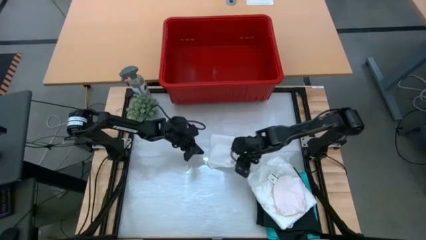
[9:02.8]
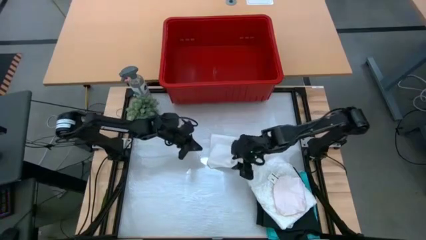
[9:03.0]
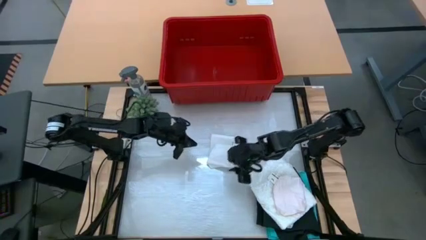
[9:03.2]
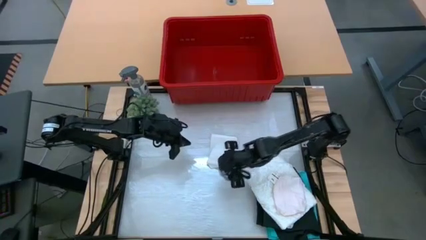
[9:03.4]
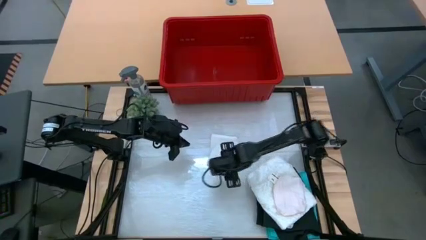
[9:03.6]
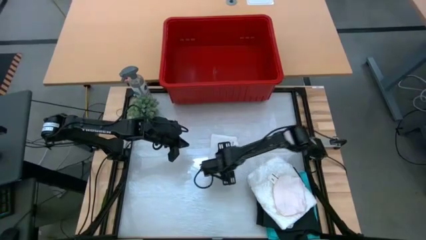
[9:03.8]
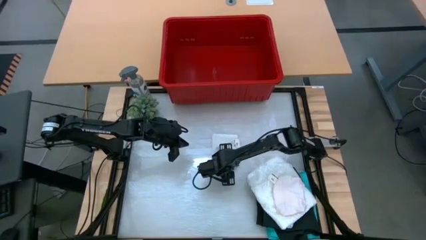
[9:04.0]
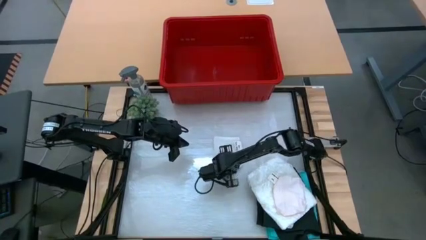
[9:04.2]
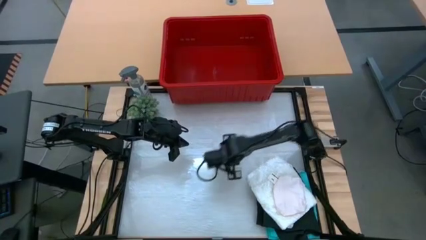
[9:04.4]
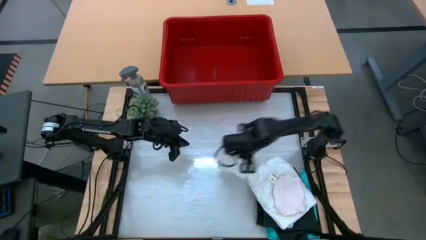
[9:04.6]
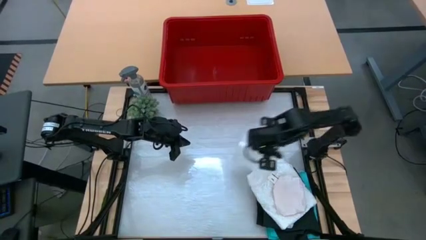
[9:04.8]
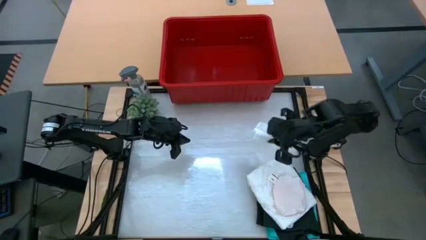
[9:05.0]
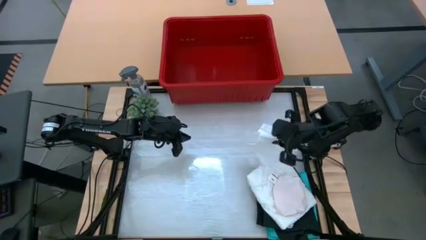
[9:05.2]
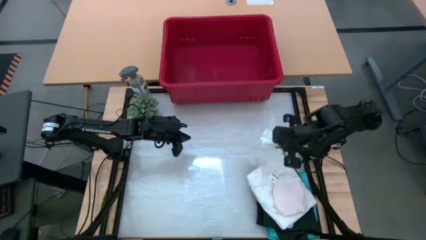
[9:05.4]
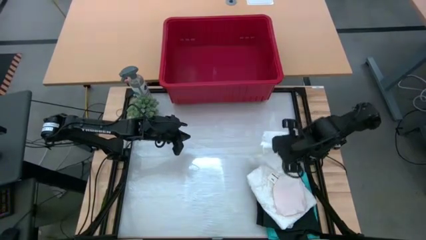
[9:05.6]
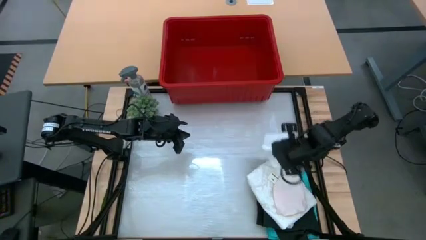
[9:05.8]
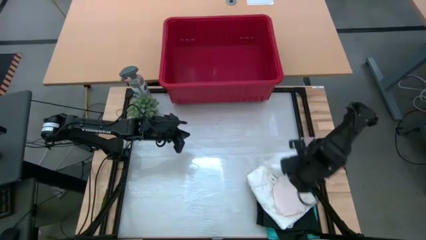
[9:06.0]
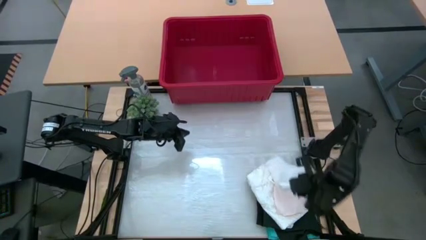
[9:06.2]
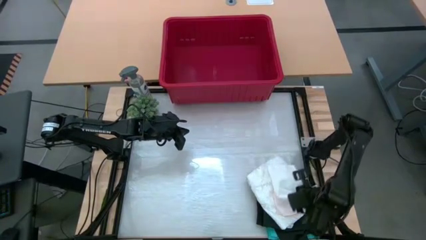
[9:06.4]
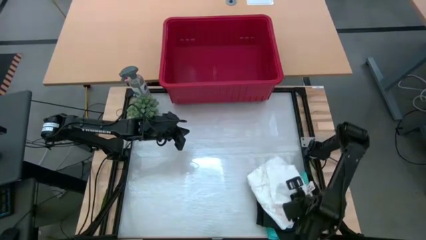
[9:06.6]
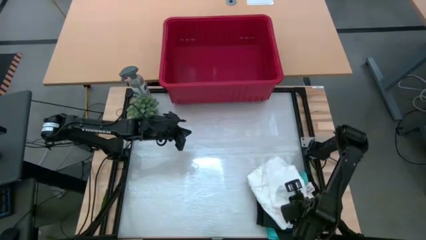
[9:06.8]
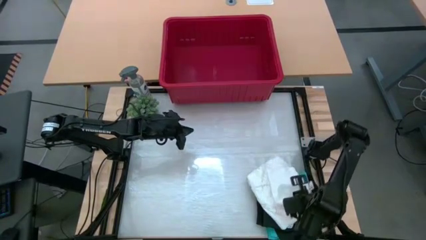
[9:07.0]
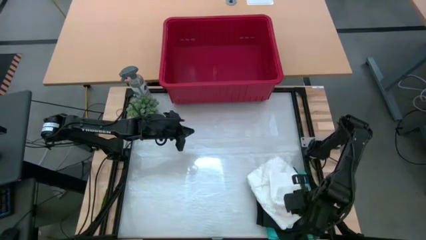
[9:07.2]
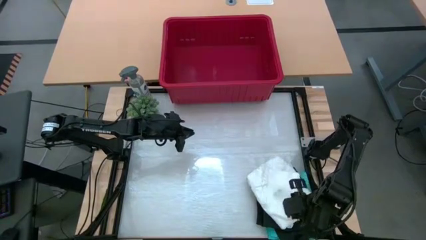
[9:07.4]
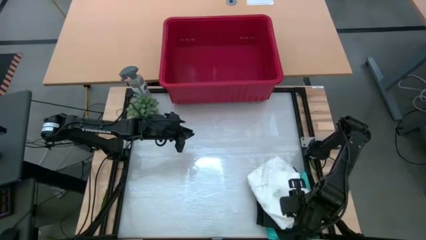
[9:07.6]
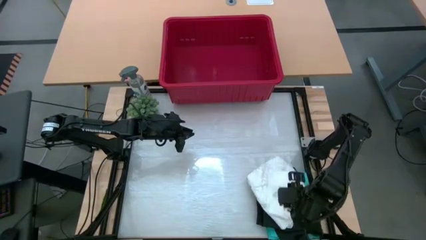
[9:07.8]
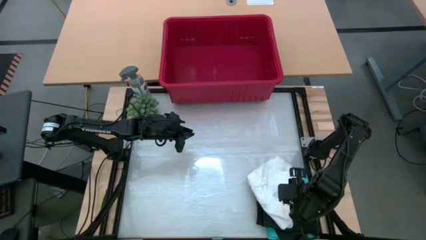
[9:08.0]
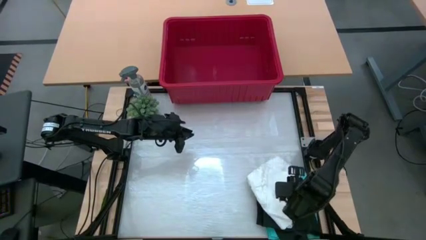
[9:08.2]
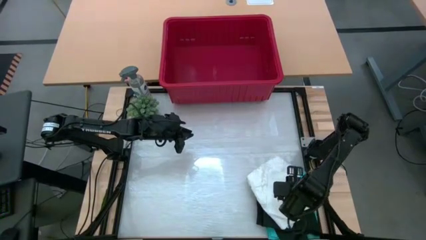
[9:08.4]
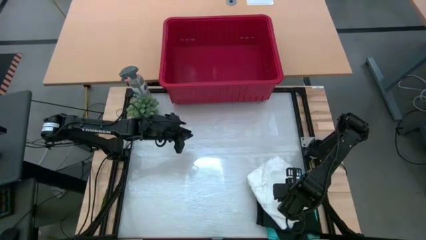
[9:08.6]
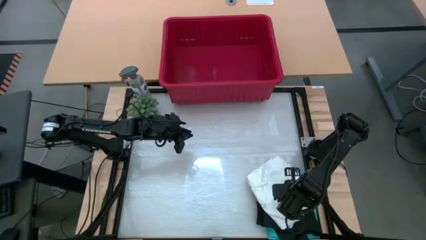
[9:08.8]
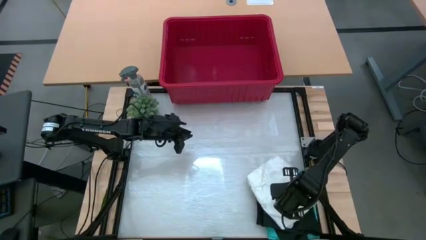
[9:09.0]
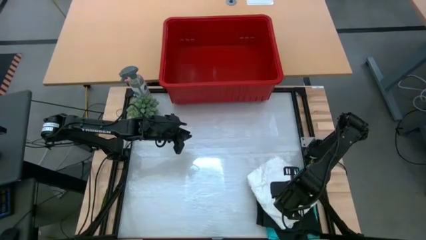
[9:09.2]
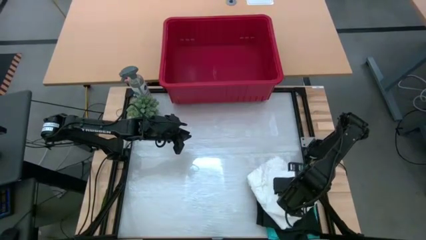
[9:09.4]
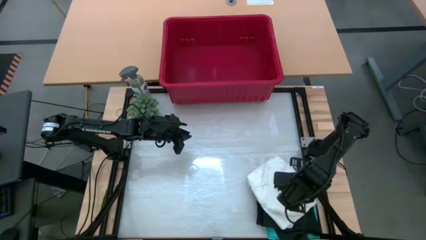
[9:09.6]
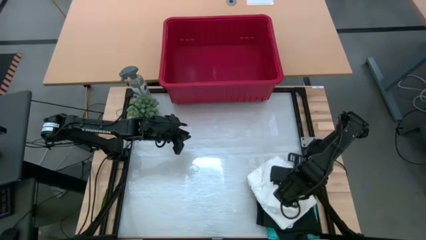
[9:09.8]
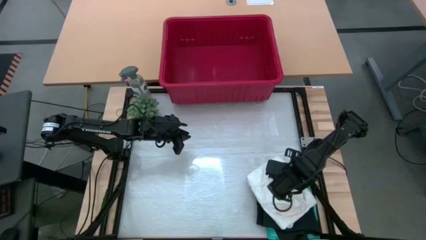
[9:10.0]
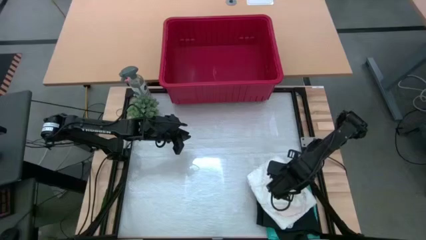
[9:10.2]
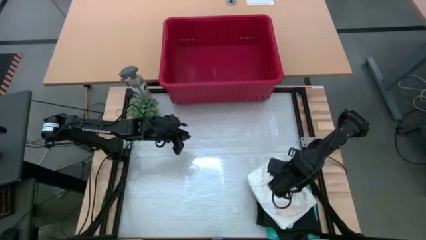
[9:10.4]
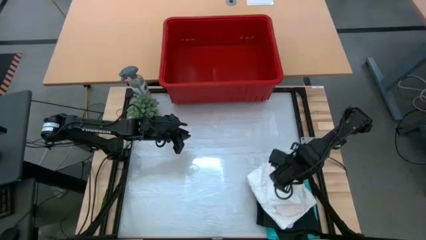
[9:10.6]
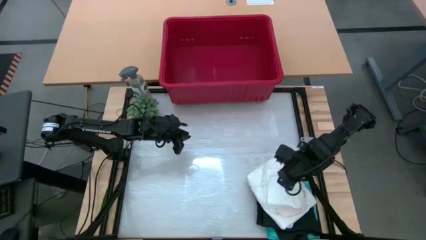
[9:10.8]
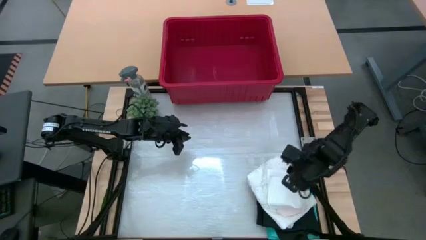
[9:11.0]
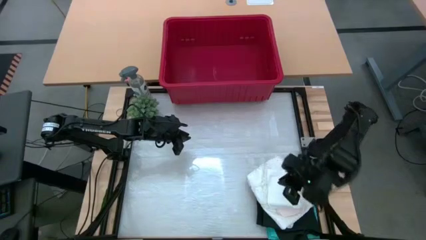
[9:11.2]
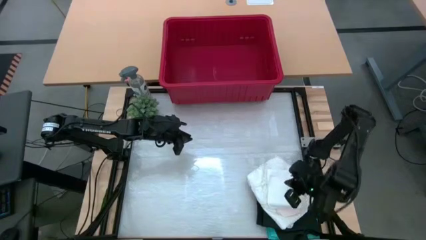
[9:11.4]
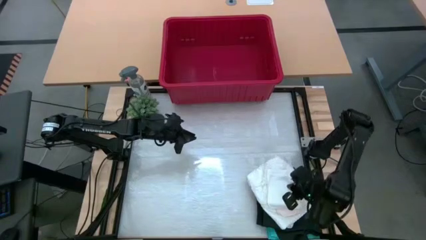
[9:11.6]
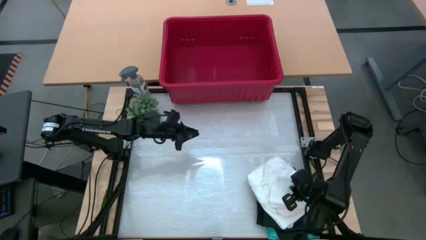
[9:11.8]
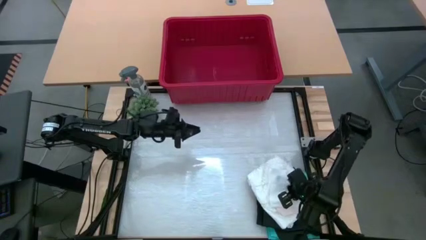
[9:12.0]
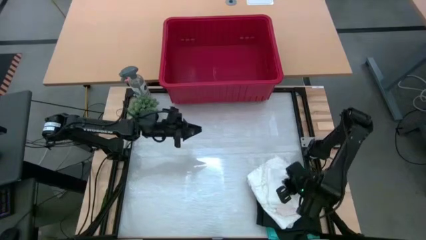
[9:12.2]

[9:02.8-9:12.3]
Task: Fold Laundry from Bin
Stack the white boxers on top of the white underwear

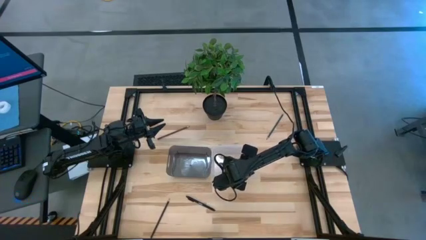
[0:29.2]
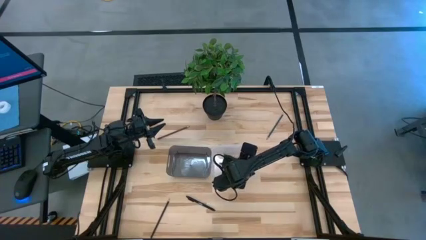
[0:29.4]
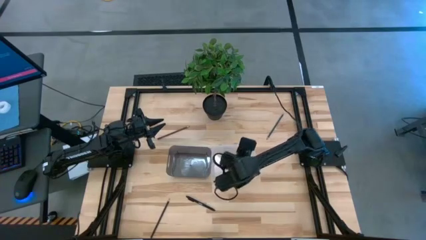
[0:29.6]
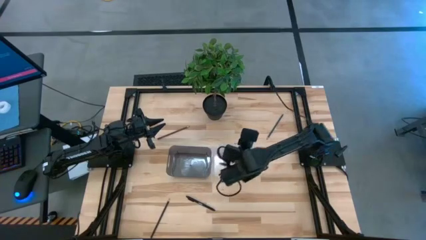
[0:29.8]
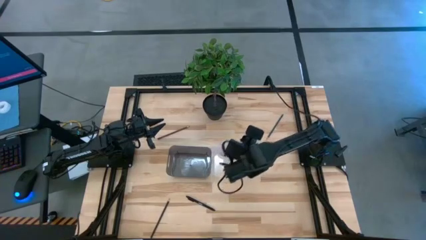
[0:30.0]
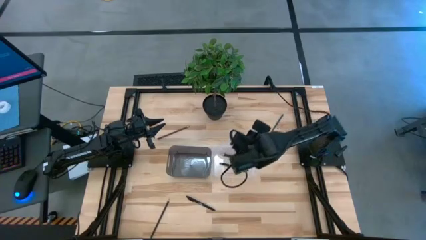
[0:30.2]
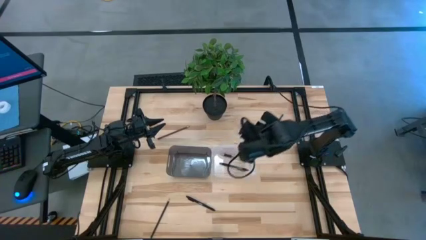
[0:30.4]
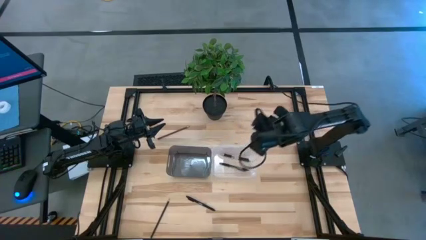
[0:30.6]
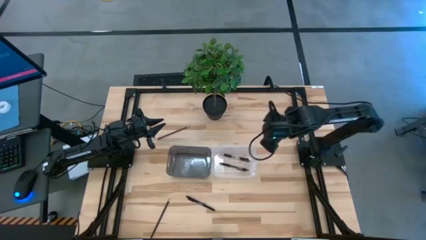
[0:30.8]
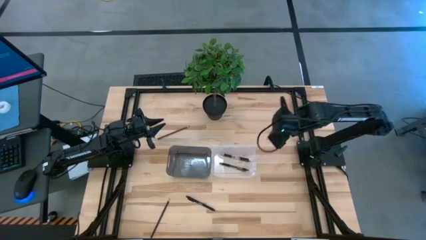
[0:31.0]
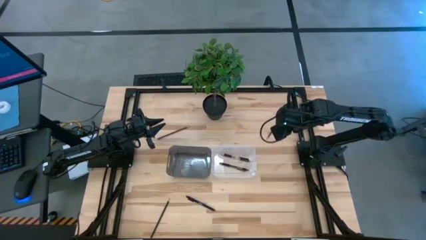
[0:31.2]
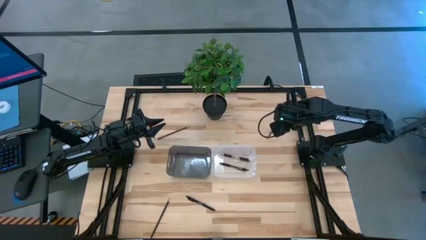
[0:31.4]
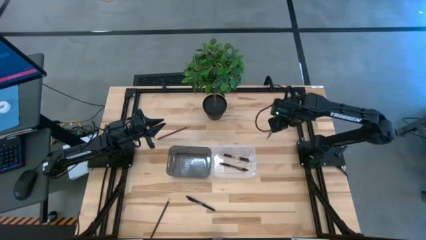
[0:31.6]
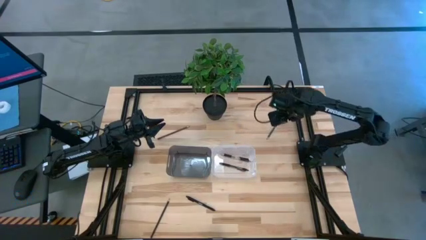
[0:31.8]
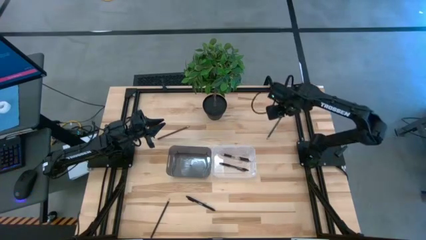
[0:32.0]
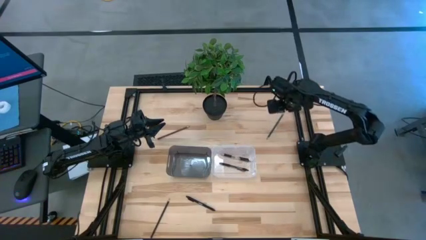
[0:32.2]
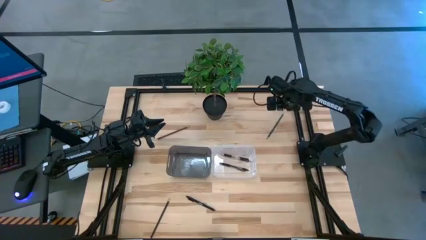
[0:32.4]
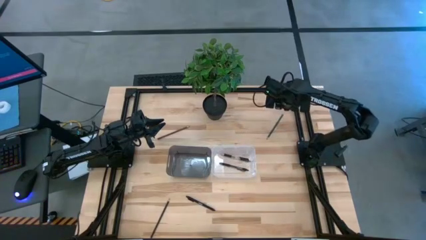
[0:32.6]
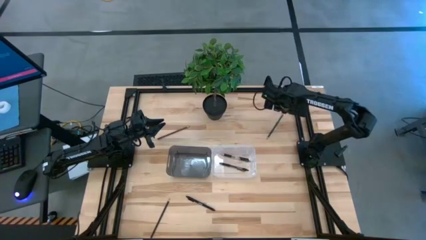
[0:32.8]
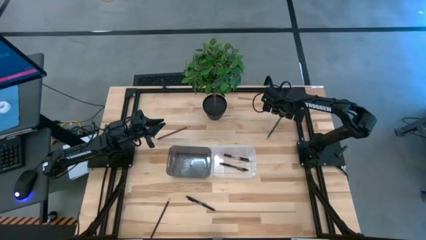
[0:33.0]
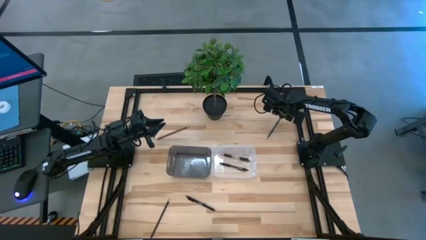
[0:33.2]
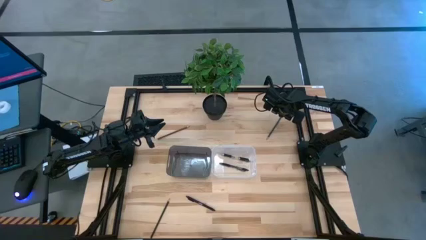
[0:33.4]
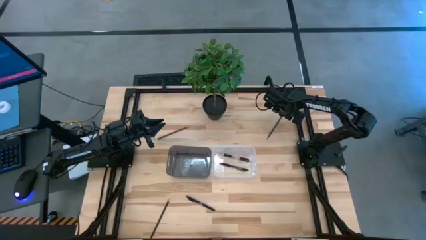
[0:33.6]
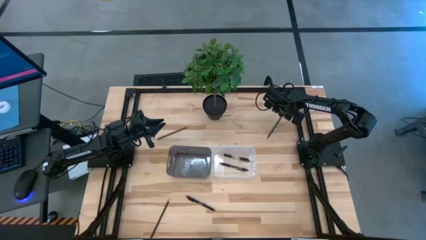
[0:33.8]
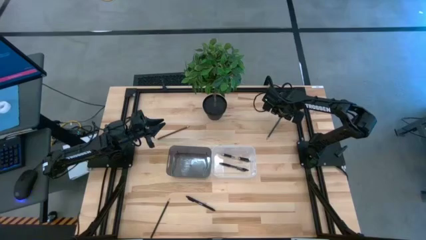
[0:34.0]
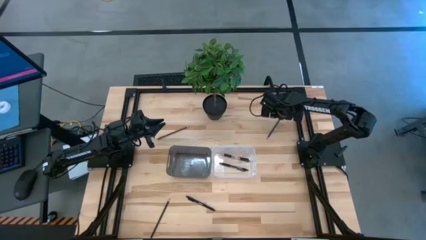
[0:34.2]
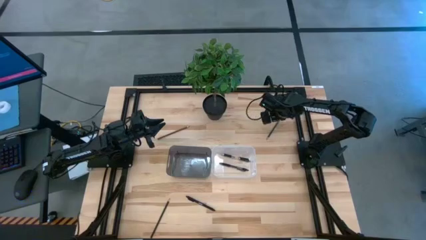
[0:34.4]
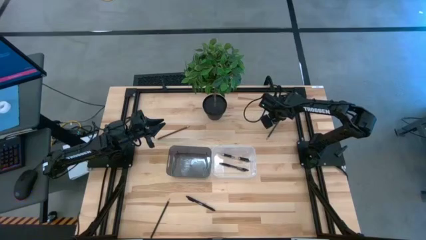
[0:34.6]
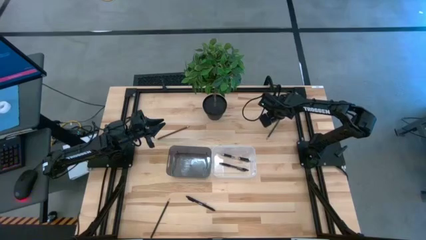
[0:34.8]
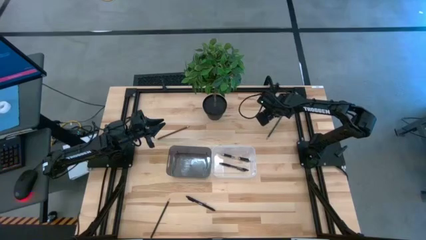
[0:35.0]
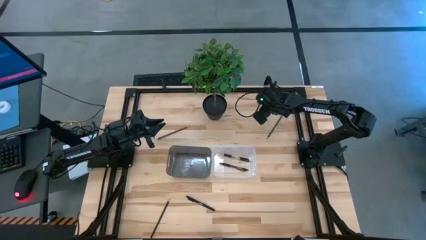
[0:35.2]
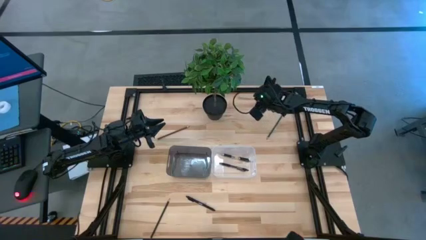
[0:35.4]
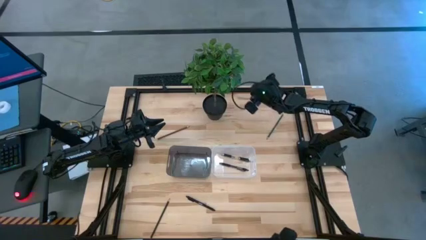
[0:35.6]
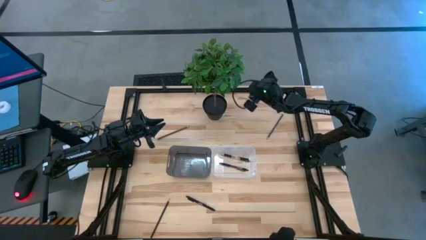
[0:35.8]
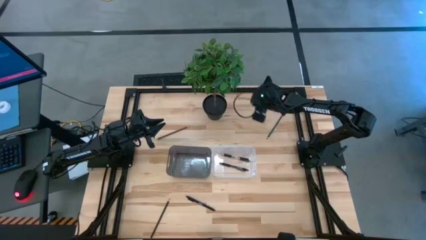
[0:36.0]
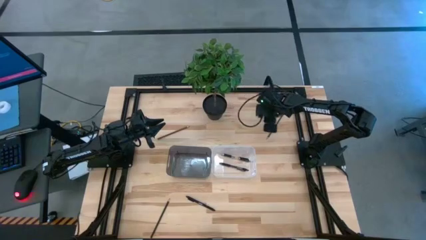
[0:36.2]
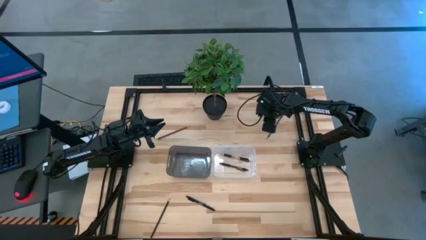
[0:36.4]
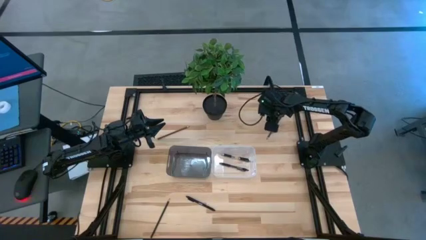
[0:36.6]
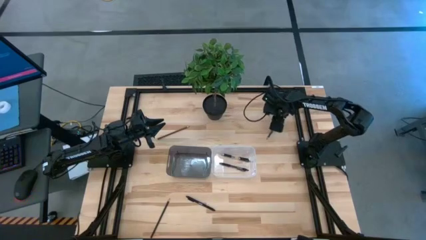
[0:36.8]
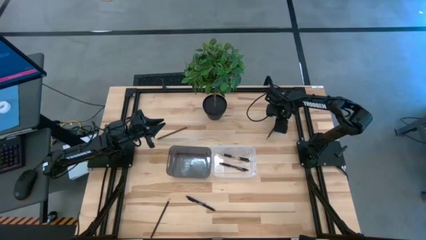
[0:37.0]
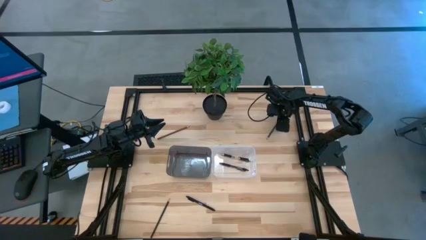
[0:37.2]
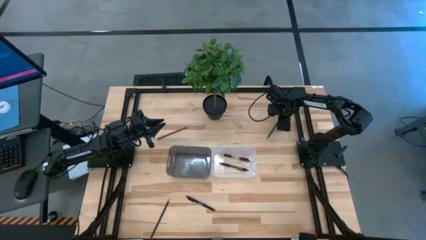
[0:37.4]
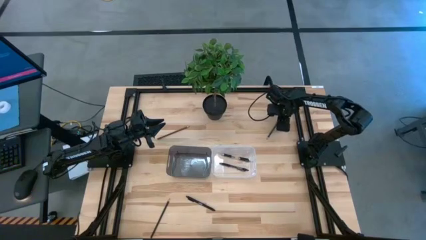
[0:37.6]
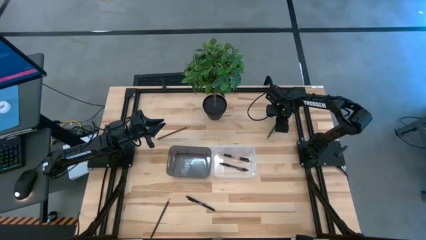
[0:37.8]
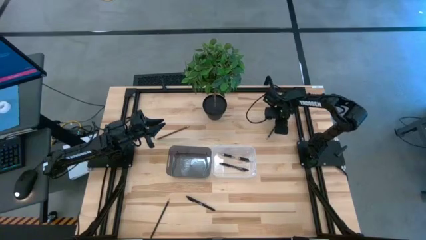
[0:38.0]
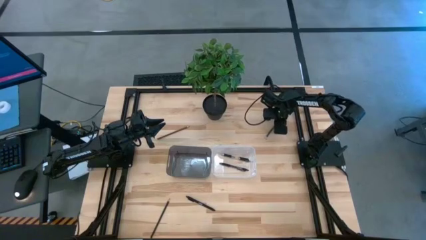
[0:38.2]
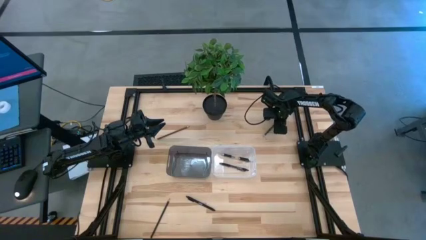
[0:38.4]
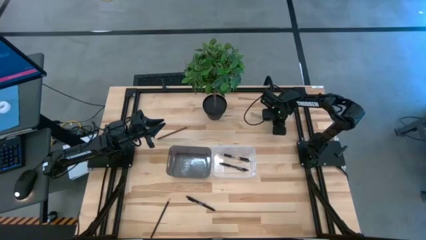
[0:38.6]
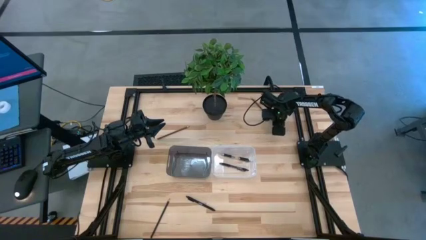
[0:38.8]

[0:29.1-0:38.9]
Task: Sort pens & pencils
Put the green pencil into the black bin
